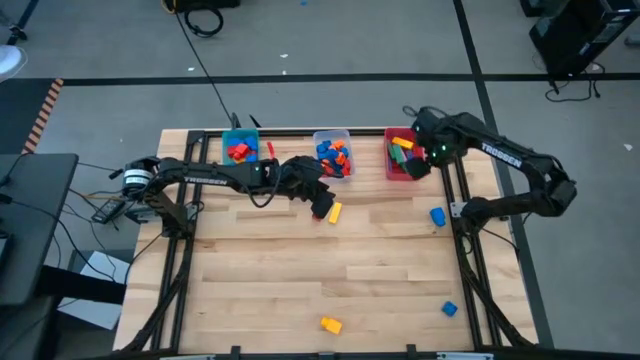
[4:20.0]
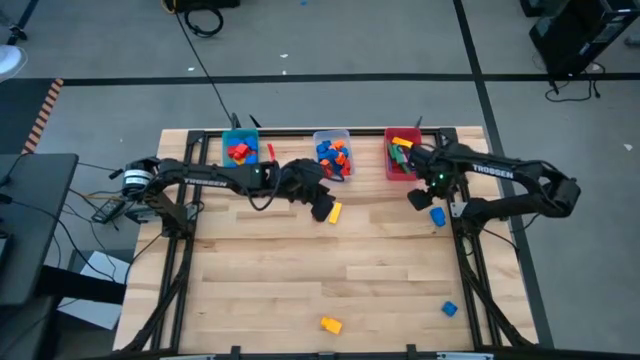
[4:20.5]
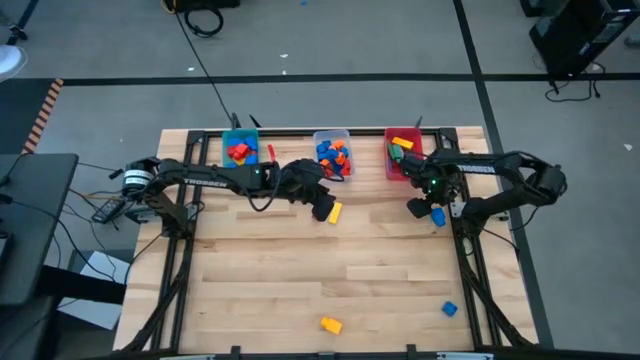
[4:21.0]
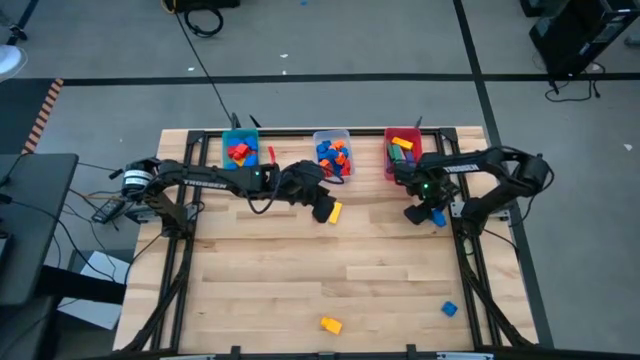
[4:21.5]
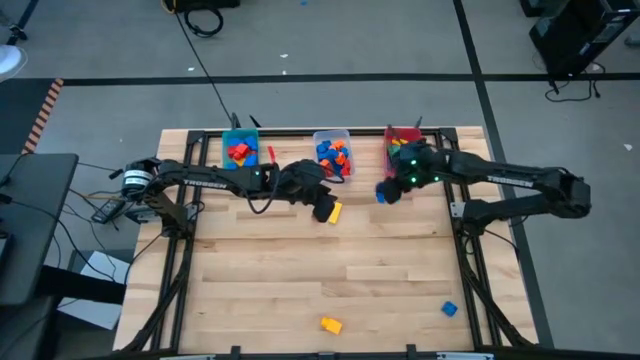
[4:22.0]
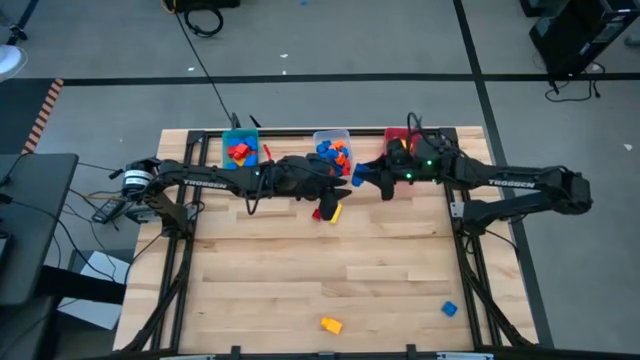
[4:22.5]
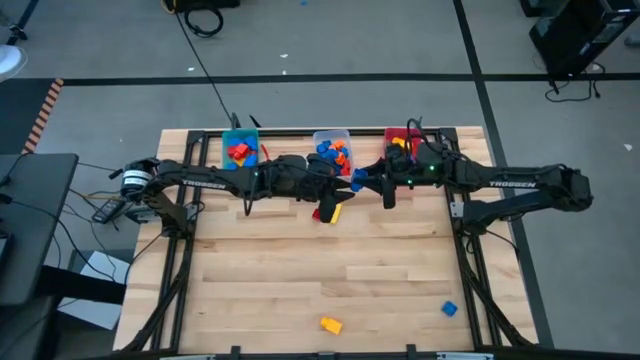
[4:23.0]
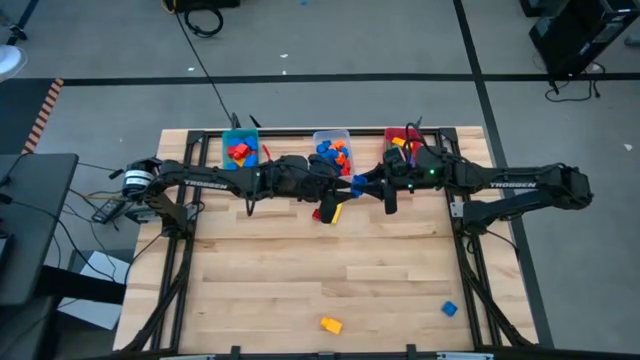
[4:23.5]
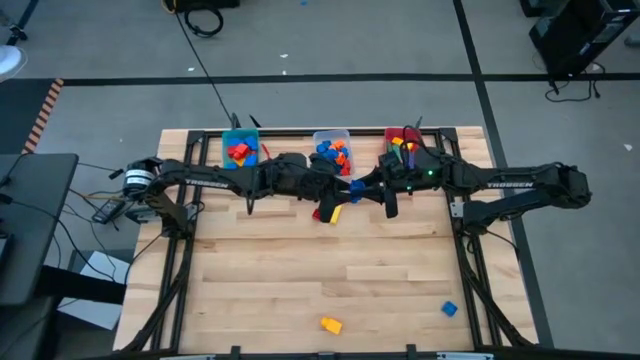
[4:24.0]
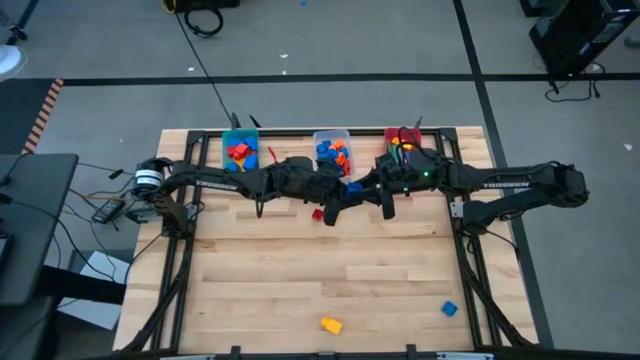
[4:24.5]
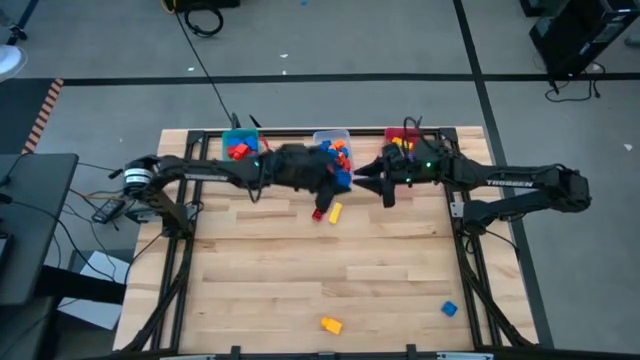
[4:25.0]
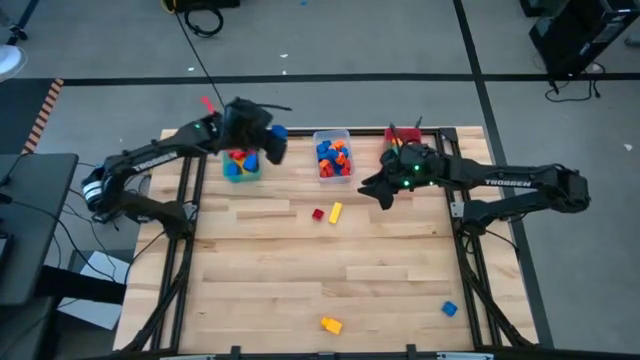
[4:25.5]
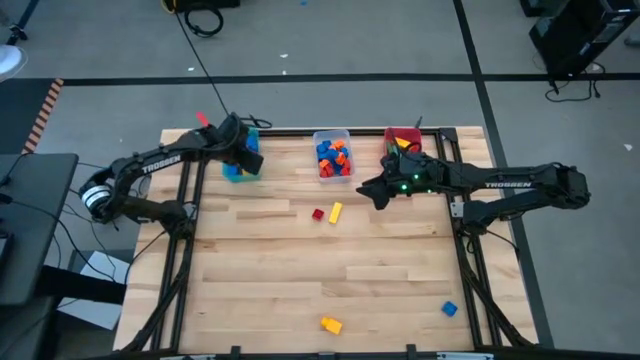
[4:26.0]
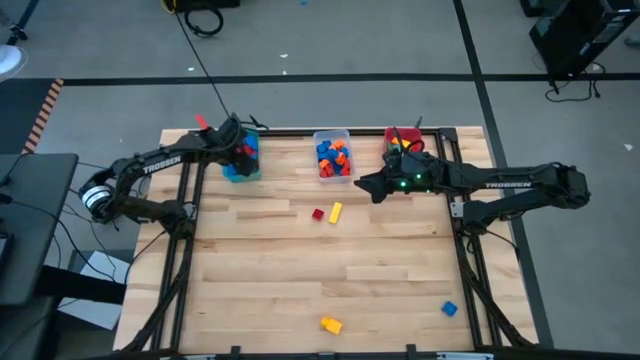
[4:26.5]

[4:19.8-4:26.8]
Task: Sort blocks by size
Put the blue 1 stud game piece into the blue bin

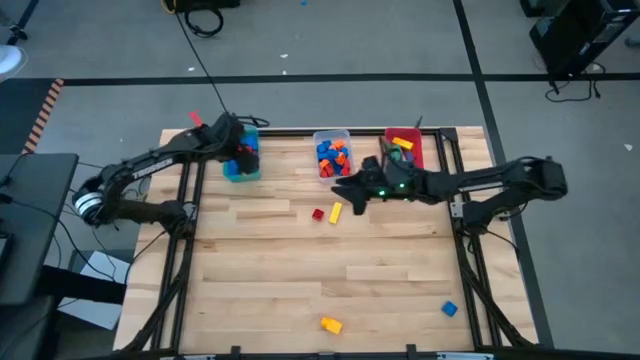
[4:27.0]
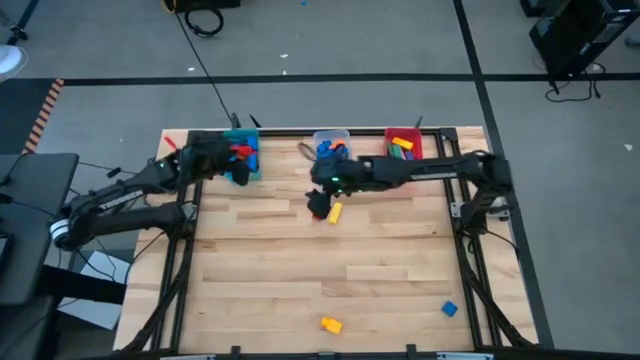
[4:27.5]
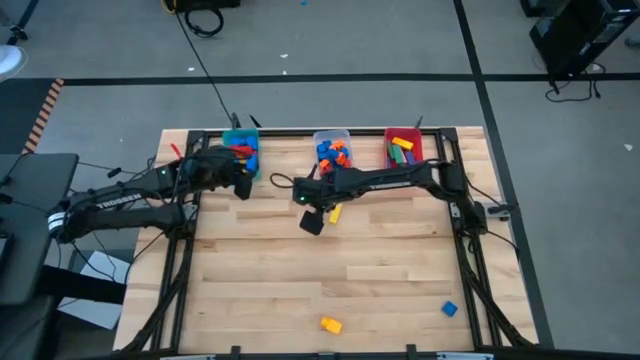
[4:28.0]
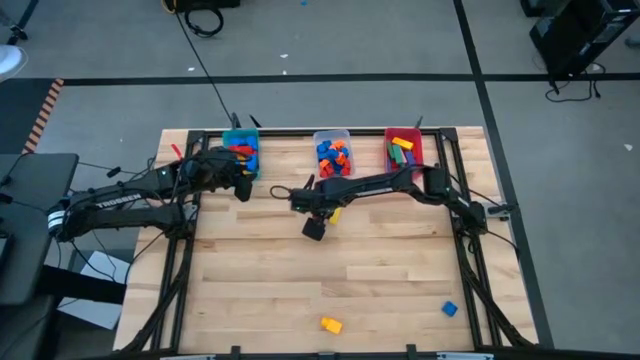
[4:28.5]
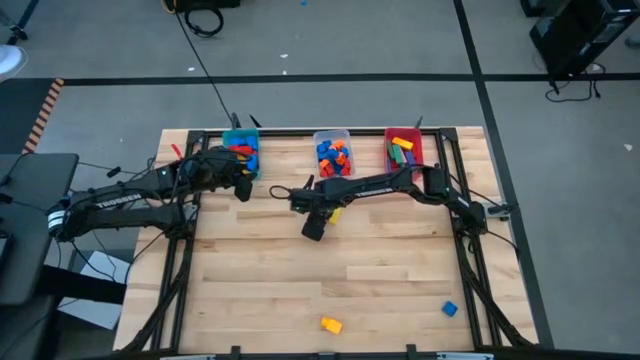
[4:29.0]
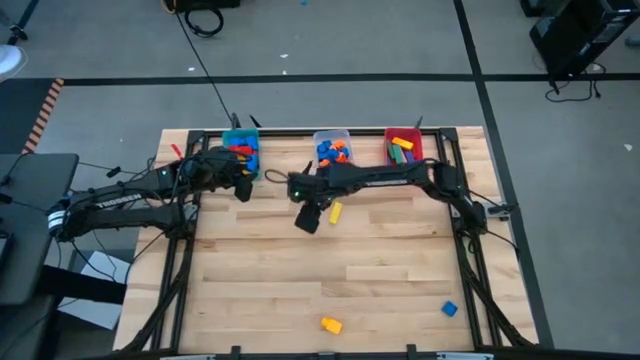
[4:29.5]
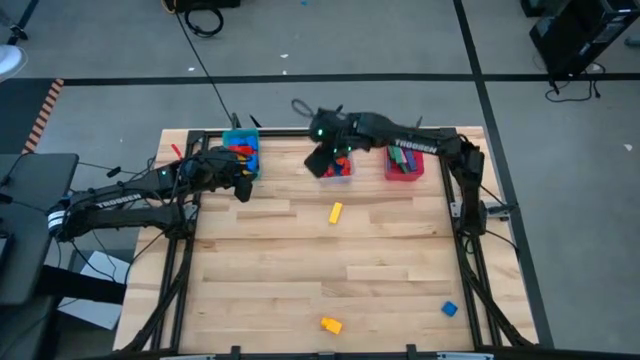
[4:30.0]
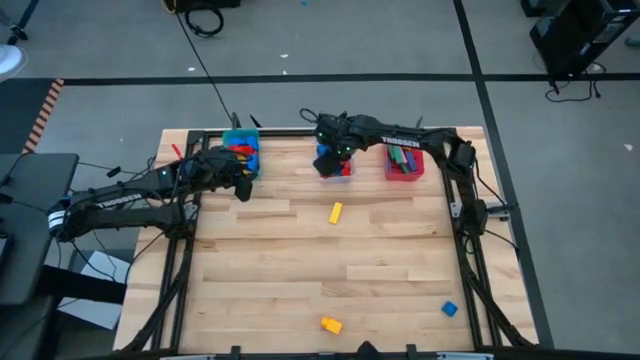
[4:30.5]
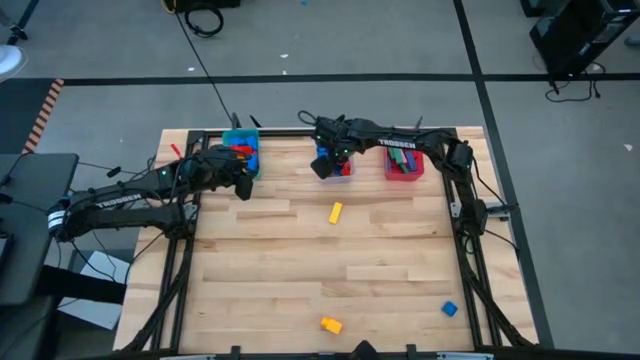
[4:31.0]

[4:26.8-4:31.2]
Put the red 4 stud game piece into the transparent bin

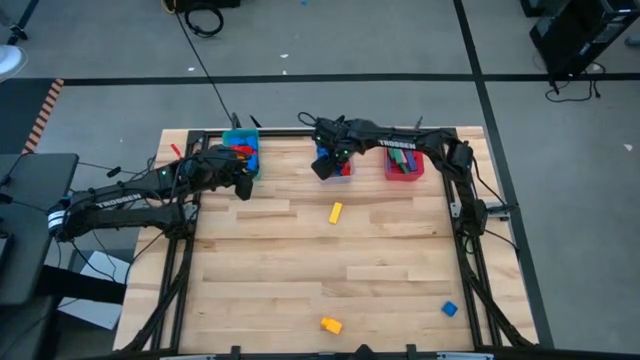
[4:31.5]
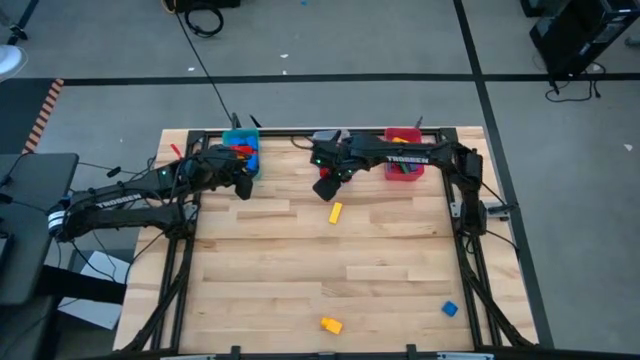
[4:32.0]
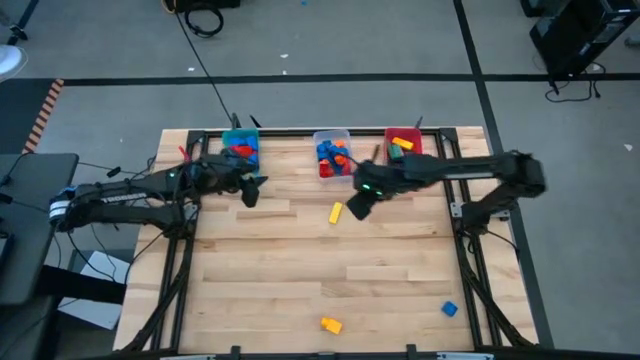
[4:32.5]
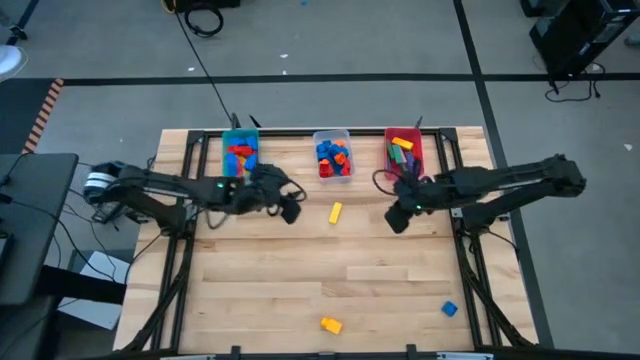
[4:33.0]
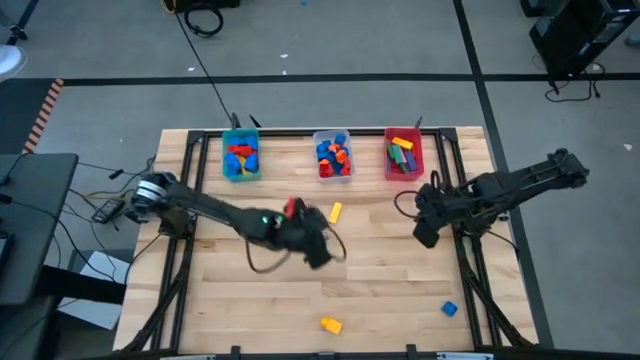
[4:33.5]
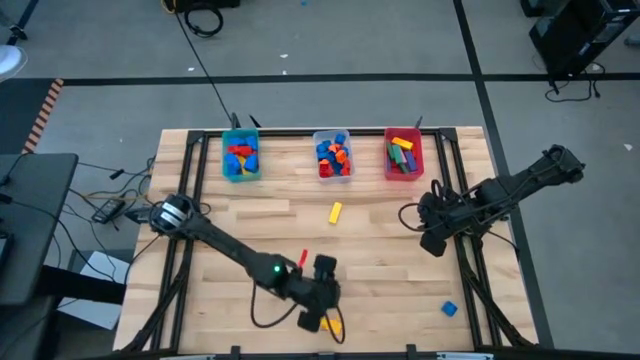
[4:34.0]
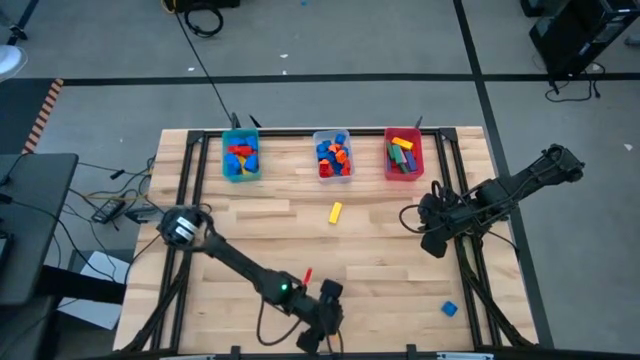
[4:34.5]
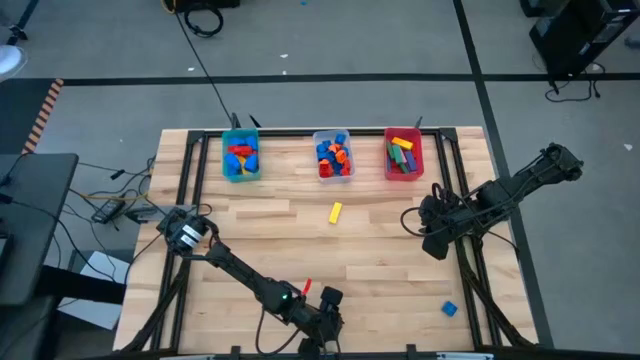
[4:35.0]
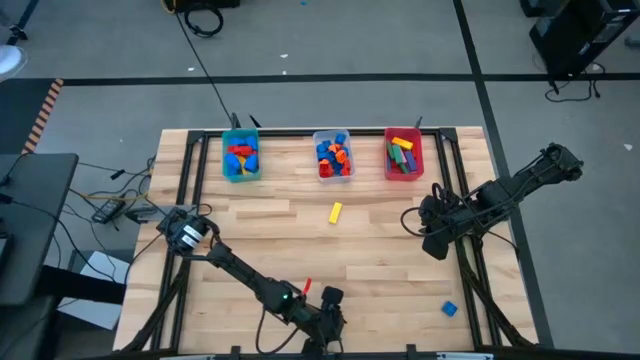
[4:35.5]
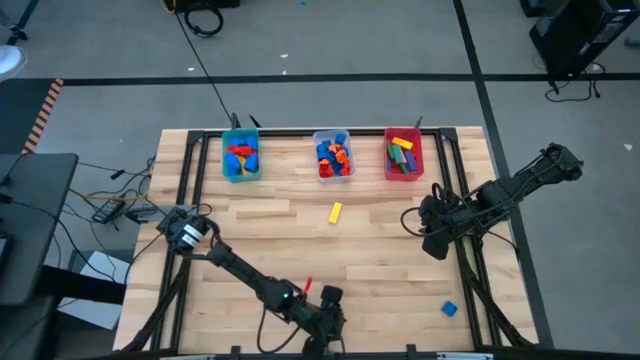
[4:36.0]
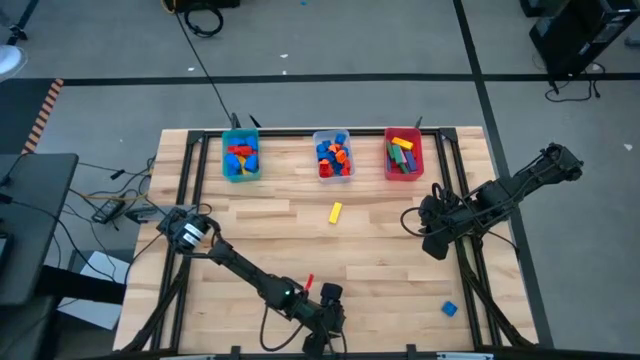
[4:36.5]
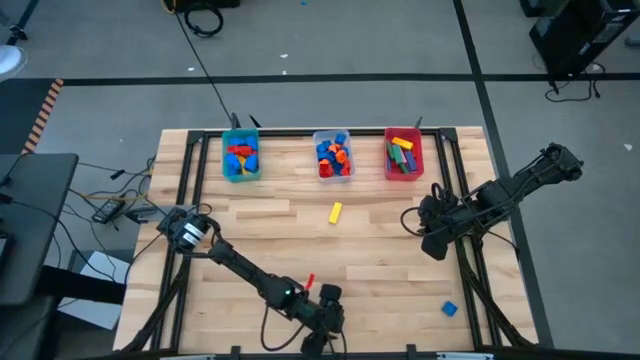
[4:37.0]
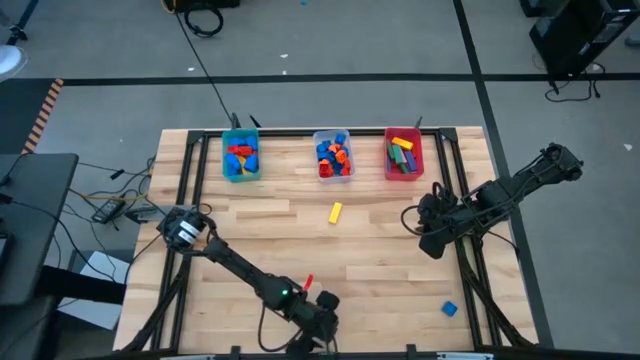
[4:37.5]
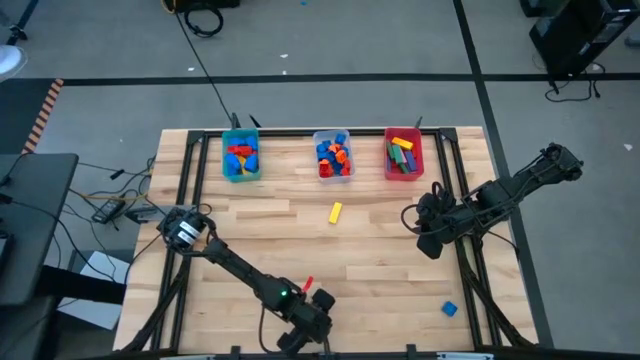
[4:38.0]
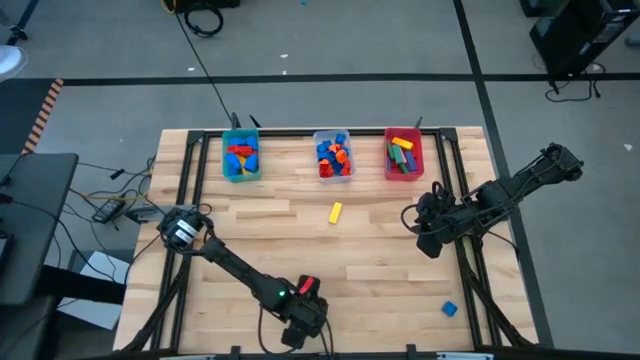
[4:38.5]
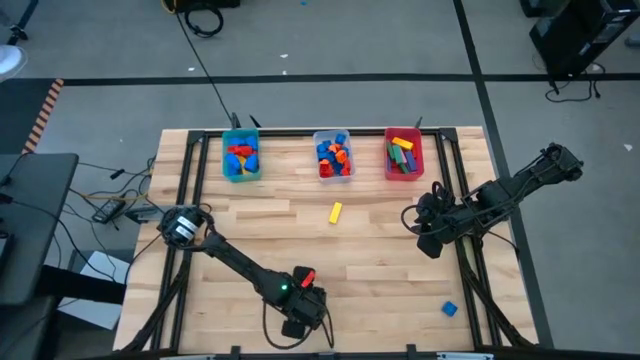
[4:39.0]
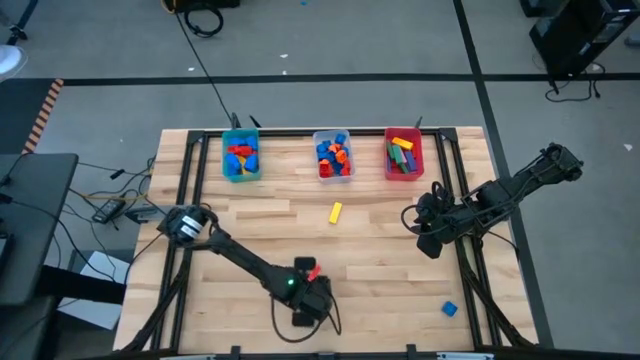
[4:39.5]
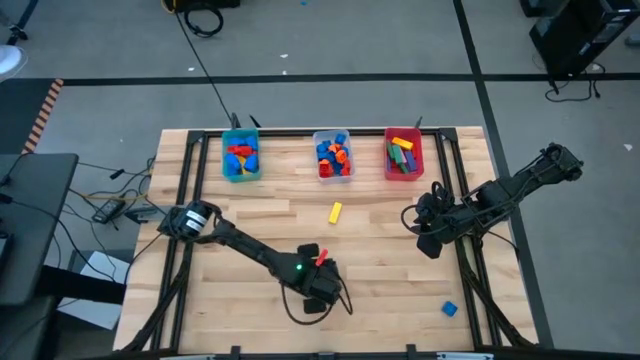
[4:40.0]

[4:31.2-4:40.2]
Put the yellow 1 stud game piece into the blue bin

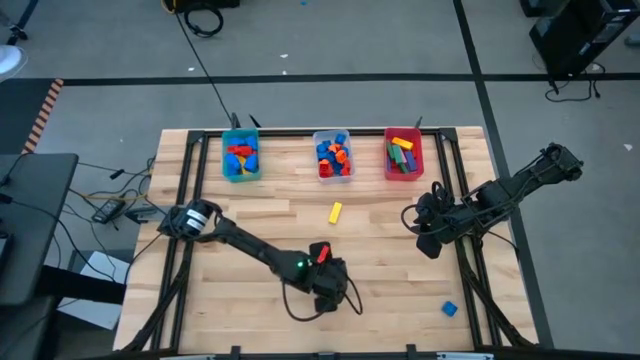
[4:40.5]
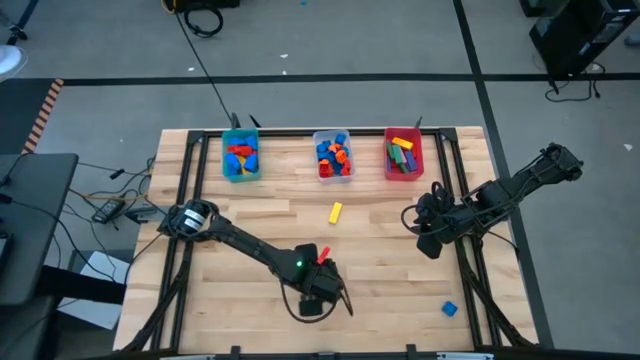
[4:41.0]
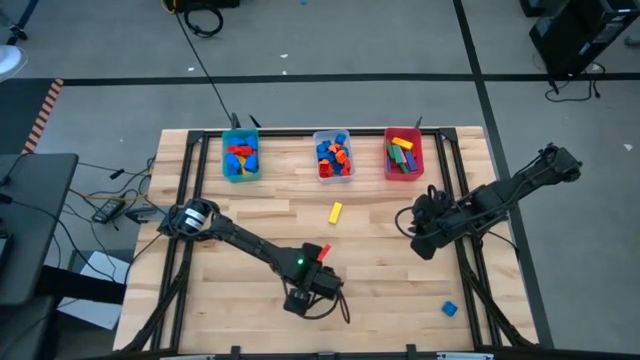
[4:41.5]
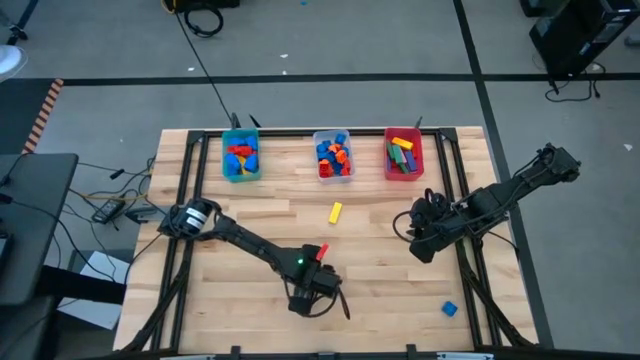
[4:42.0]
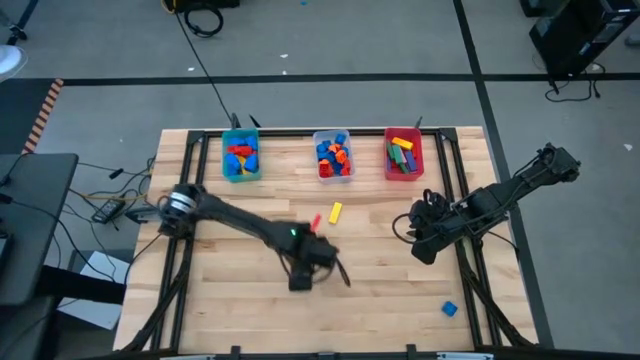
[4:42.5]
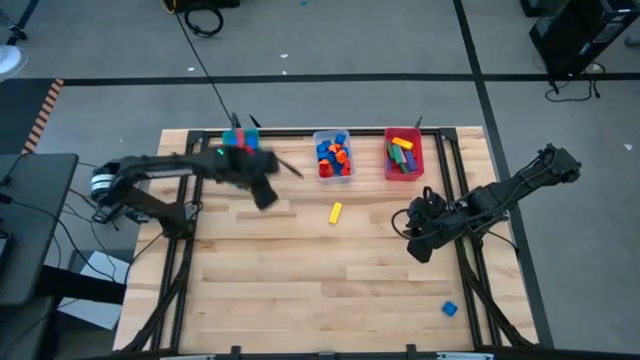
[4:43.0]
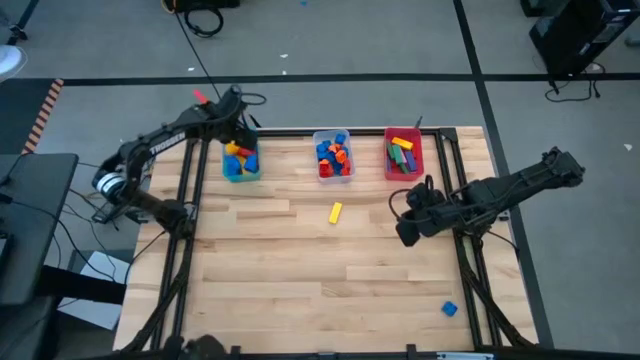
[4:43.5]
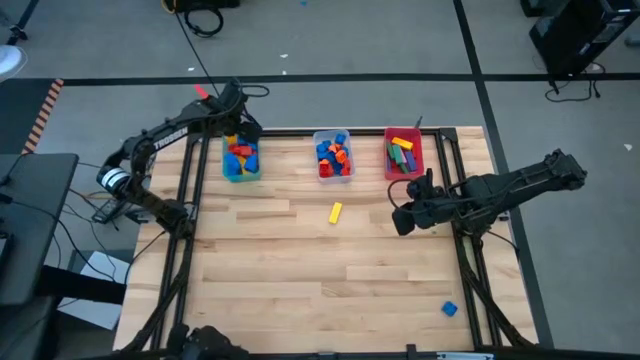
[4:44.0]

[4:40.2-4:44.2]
Put the yellow 1 stud game piece into the blue bin
